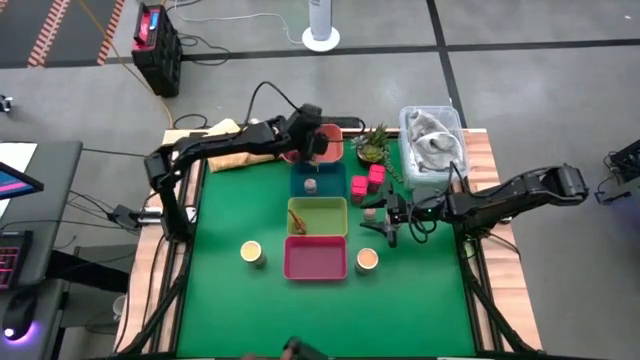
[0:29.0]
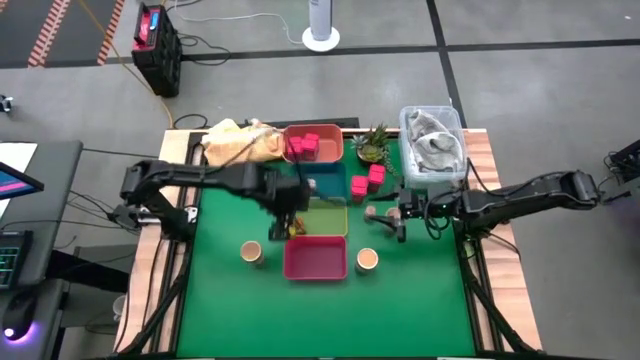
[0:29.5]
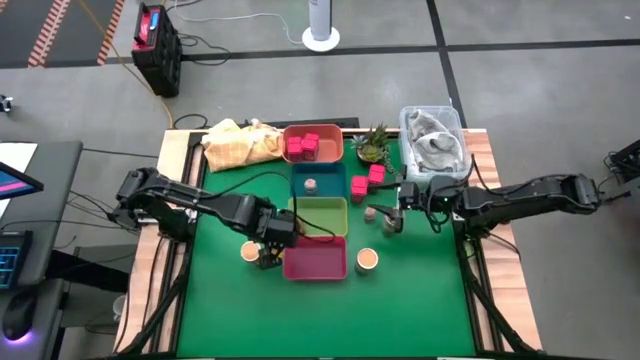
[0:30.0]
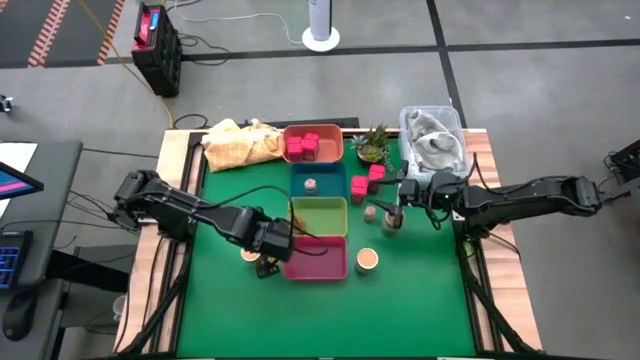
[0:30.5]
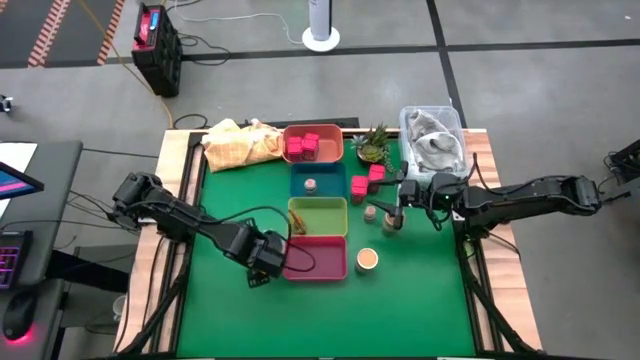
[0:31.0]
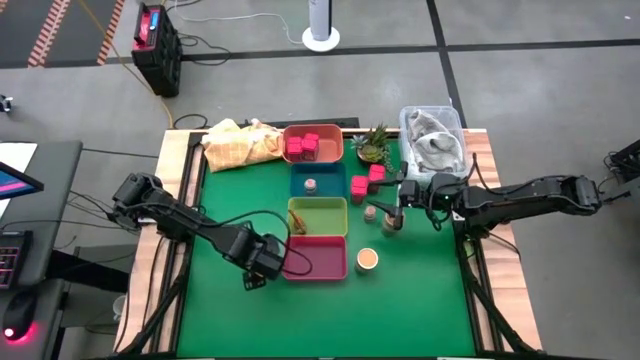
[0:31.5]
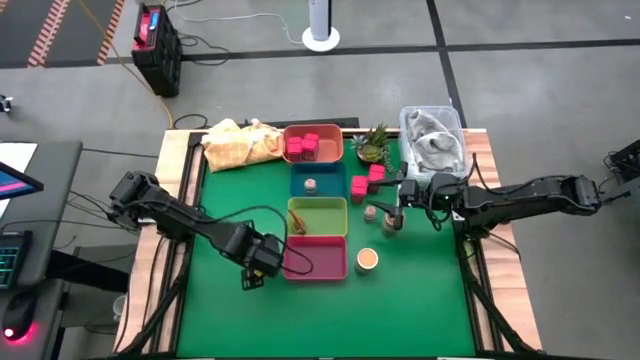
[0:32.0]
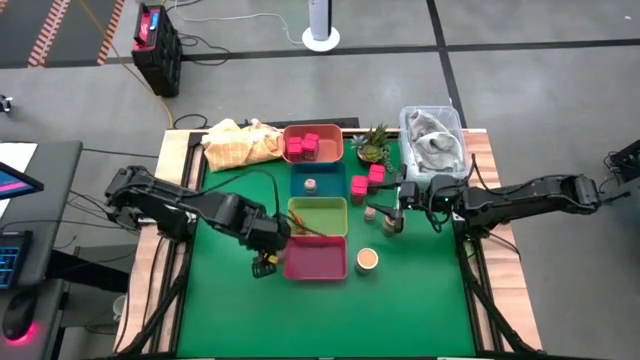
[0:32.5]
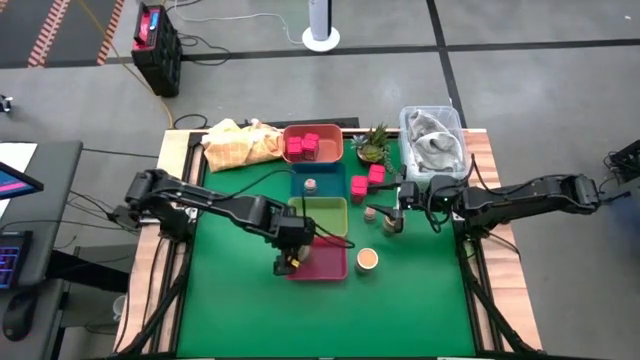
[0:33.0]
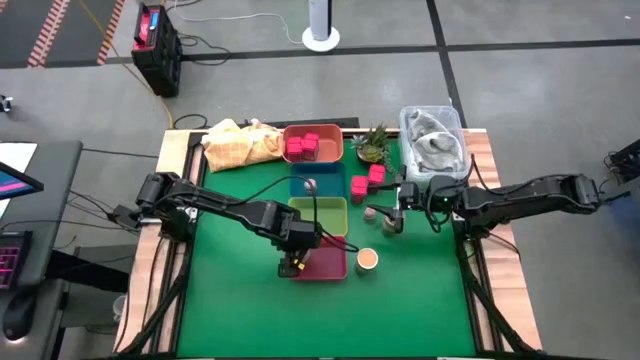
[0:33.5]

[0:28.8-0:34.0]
Task: Sort spices by type
Put the gold seasoning bottle into the red bin

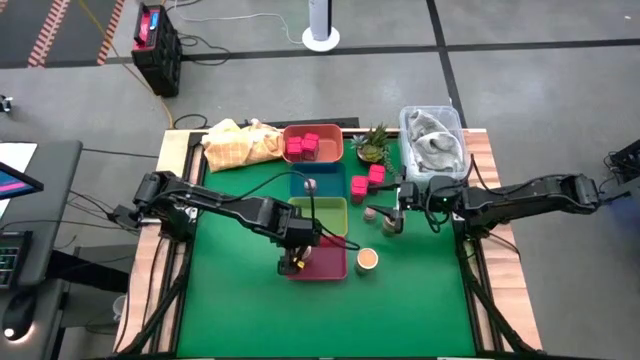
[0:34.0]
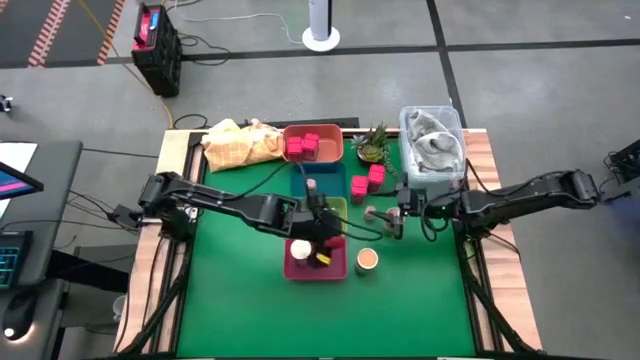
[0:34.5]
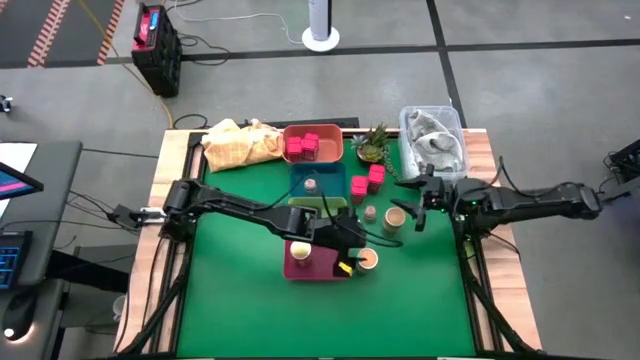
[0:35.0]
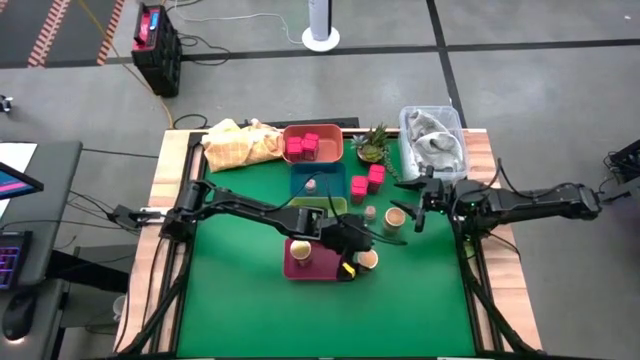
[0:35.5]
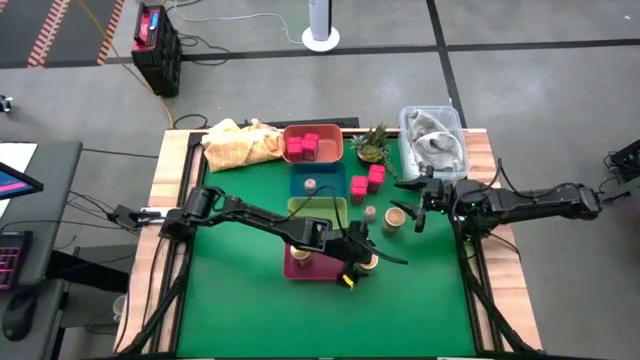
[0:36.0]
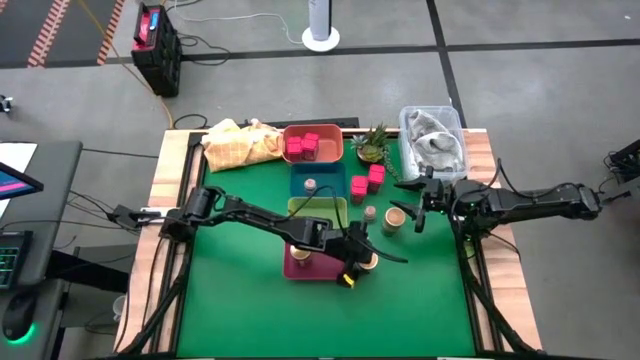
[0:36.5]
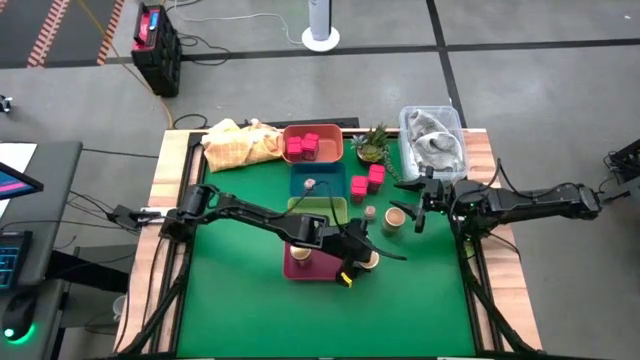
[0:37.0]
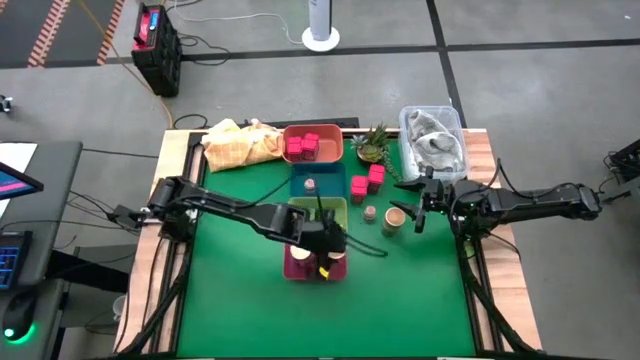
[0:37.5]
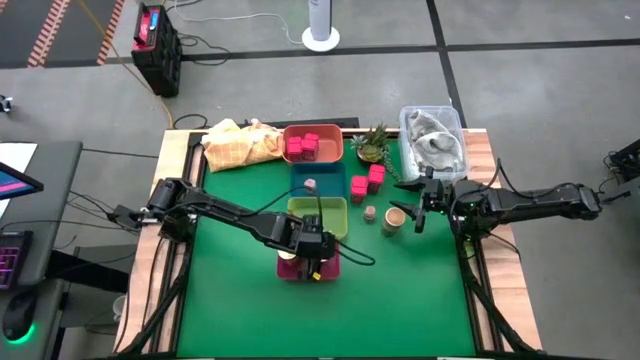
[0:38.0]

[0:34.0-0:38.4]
Put the gold seasoning bottle into the red bin

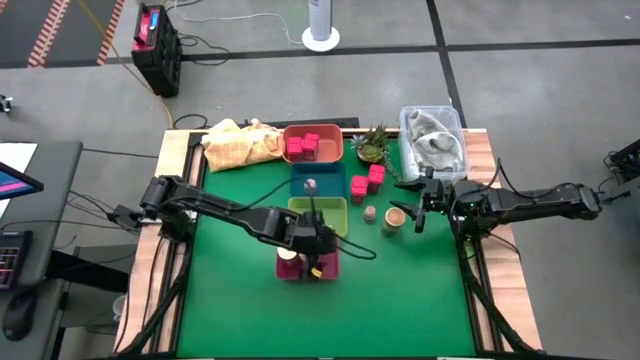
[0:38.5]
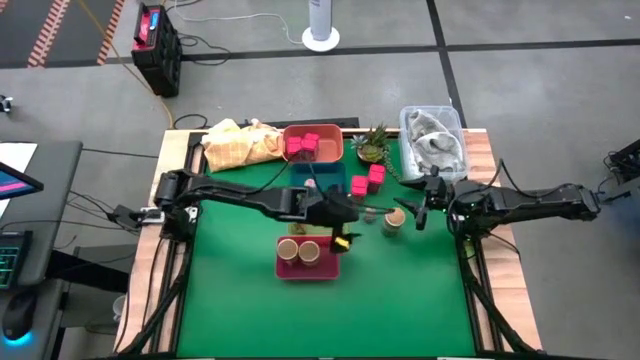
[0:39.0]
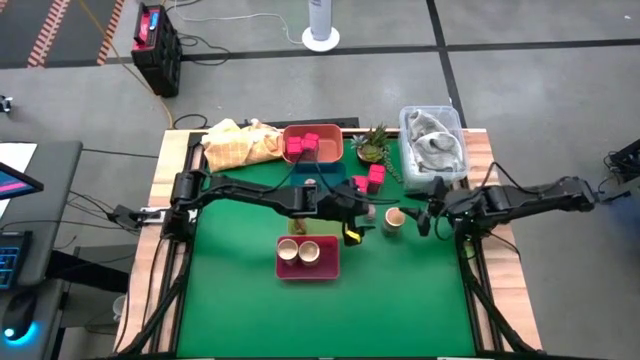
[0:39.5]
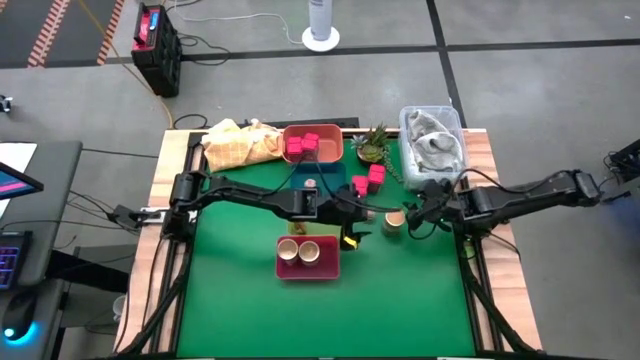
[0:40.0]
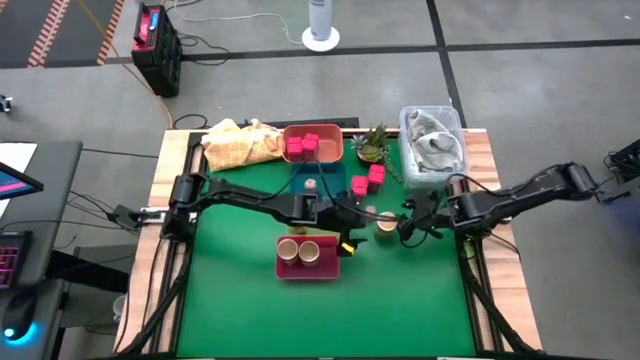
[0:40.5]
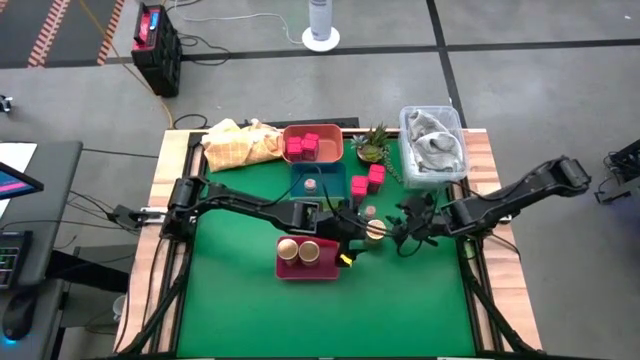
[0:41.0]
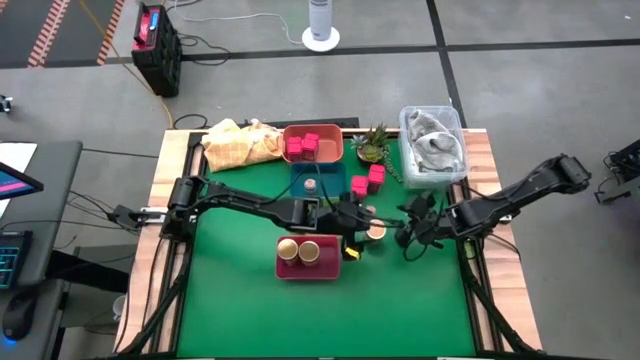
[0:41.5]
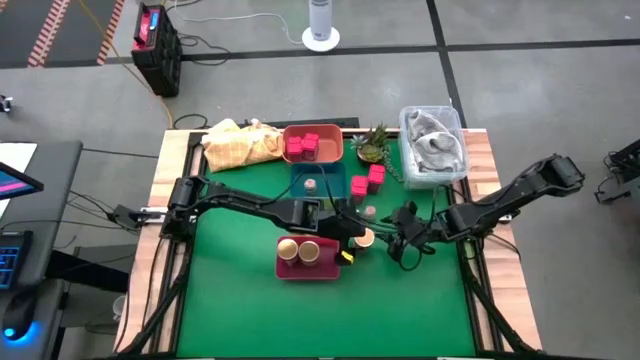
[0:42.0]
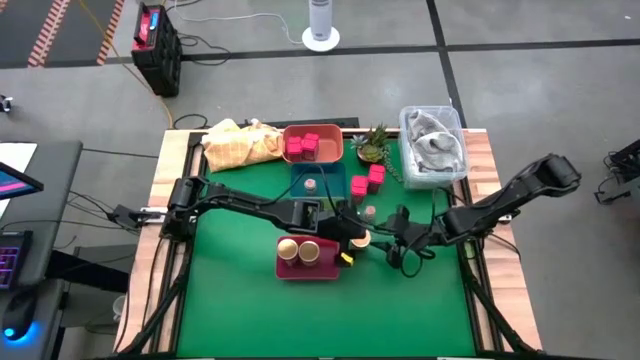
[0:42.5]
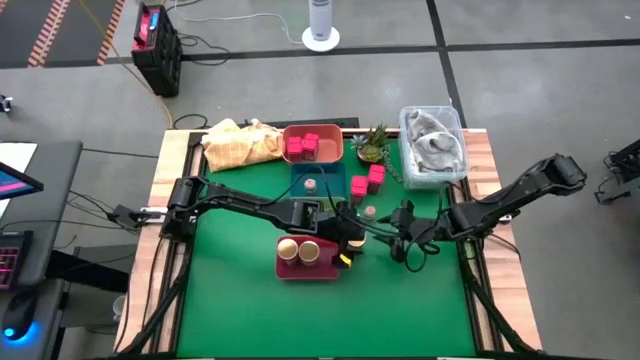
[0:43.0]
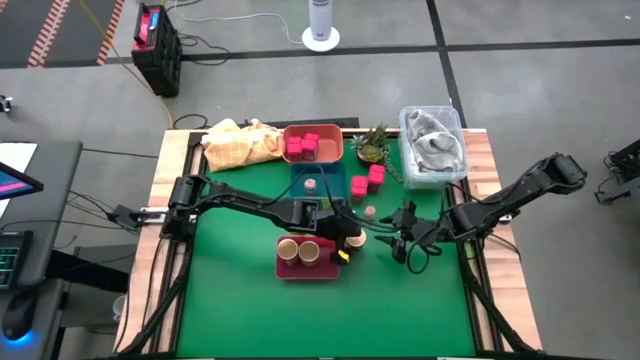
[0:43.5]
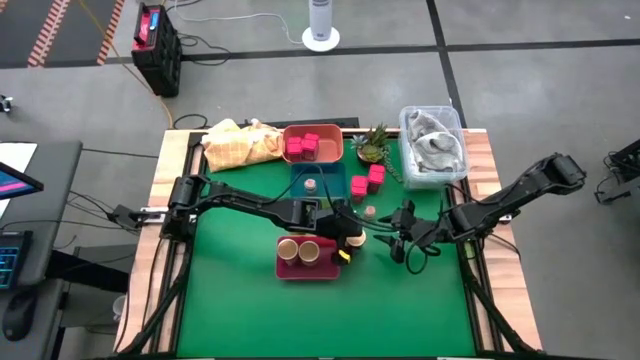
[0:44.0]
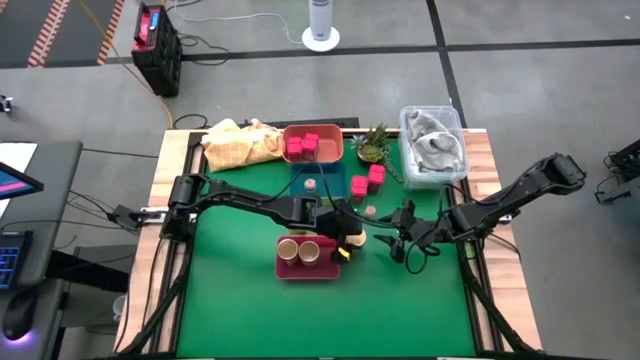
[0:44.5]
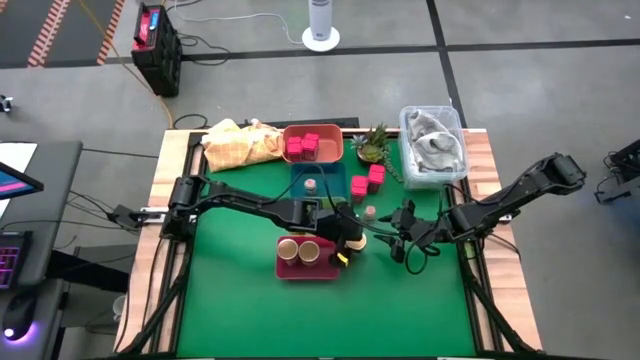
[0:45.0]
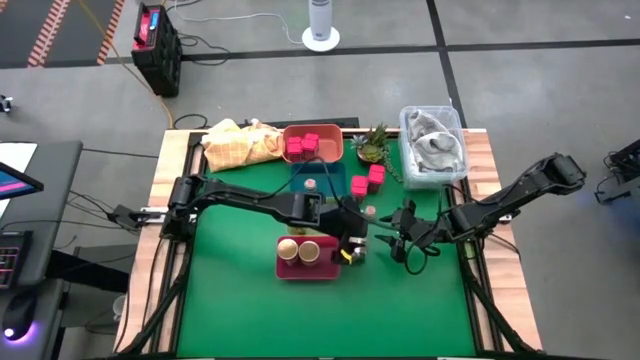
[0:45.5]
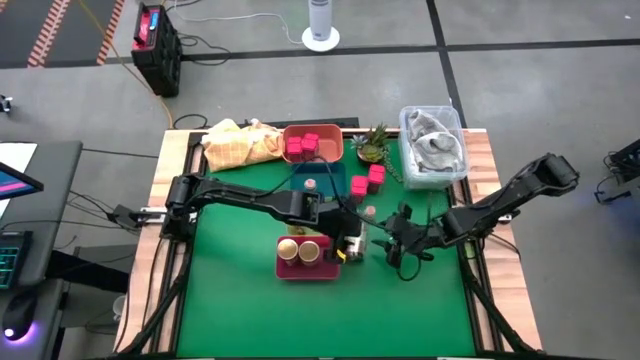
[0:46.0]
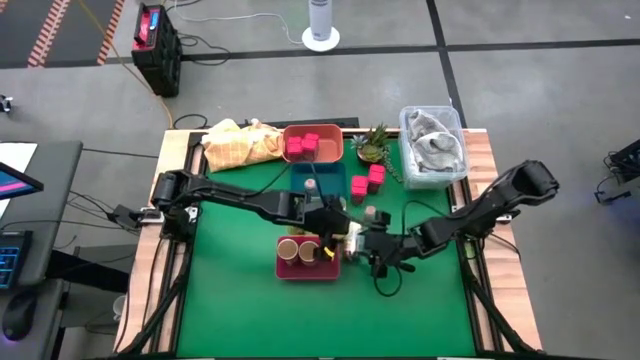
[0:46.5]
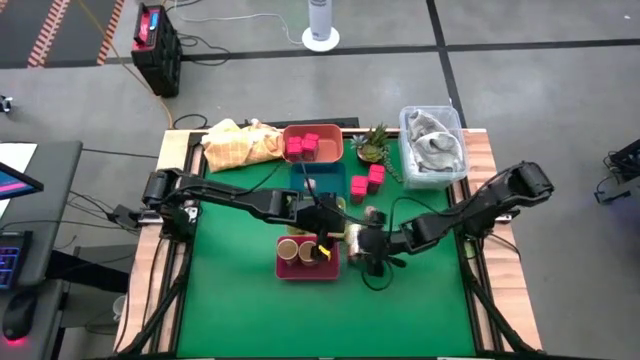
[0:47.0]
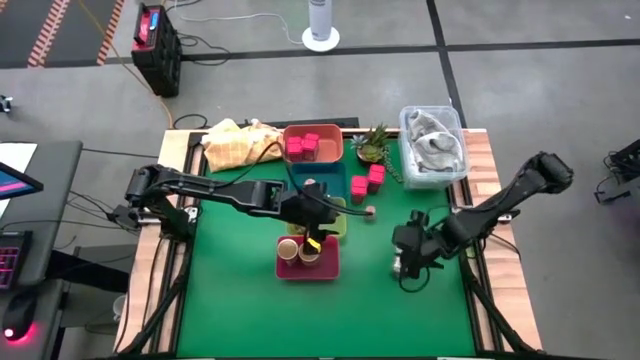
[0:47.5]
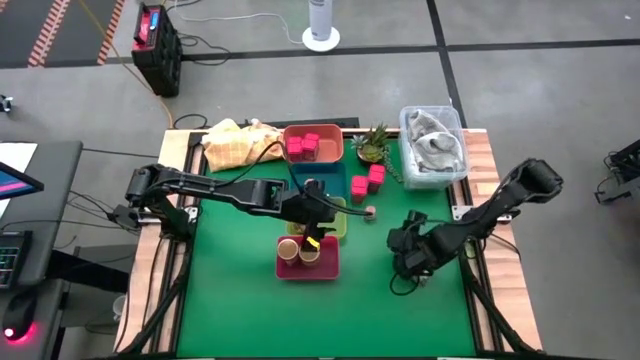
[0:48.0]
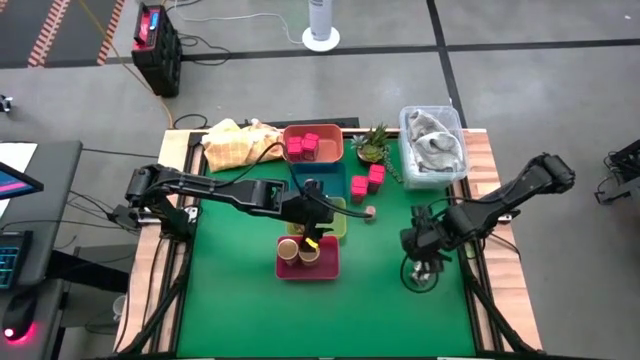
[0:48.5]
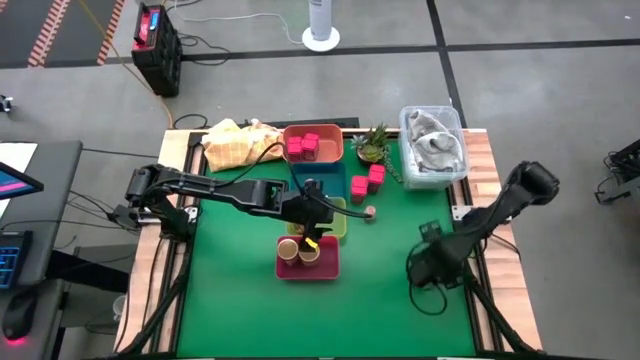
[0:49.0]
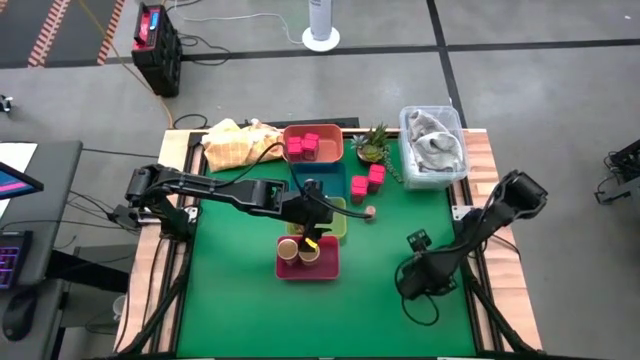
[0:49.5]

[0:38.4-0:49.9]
Put the gold seasoning bottle into the red bin
